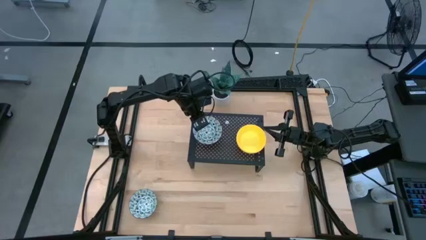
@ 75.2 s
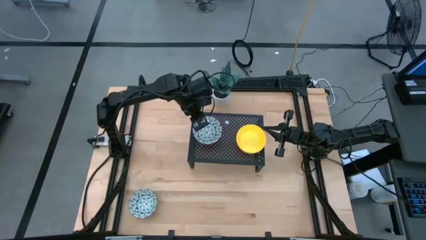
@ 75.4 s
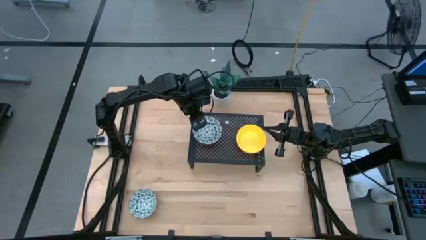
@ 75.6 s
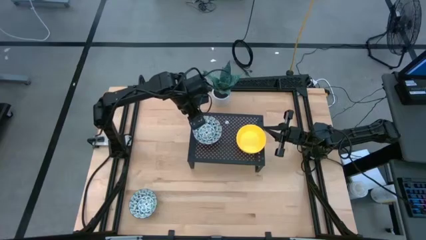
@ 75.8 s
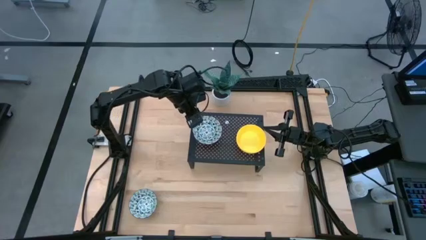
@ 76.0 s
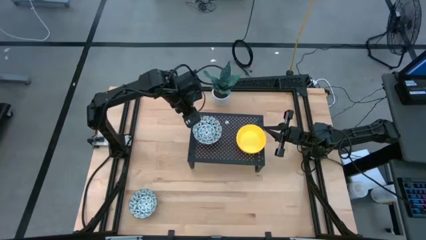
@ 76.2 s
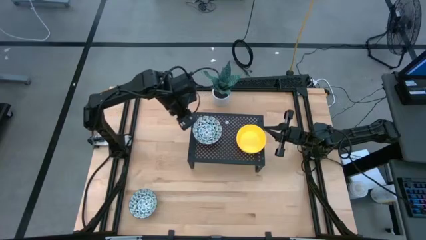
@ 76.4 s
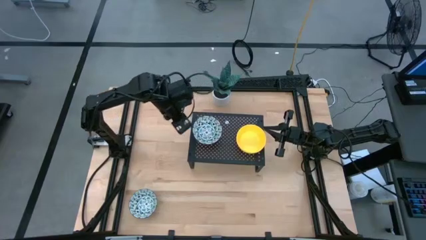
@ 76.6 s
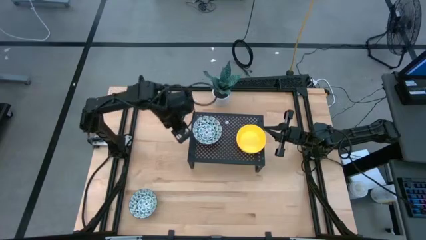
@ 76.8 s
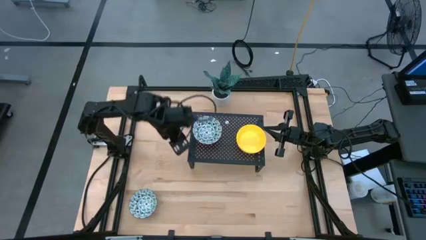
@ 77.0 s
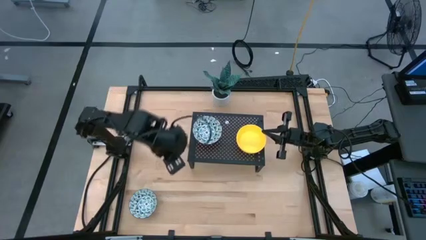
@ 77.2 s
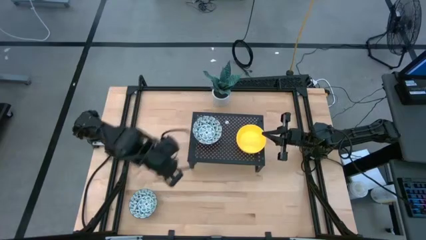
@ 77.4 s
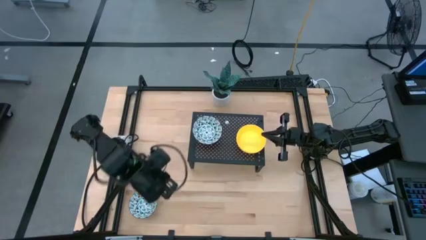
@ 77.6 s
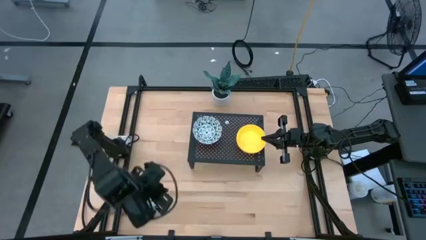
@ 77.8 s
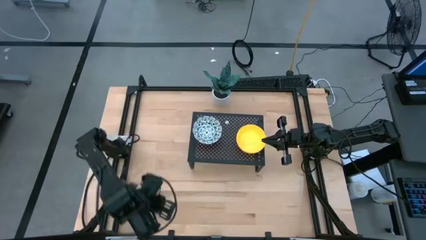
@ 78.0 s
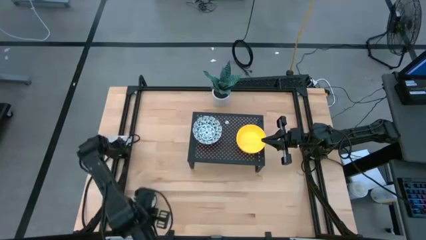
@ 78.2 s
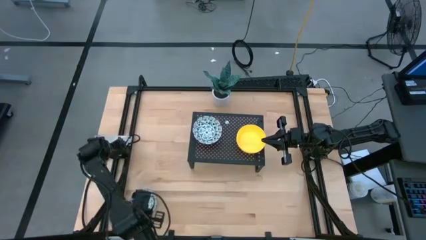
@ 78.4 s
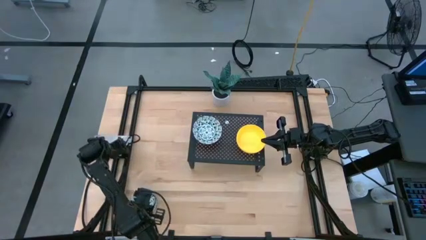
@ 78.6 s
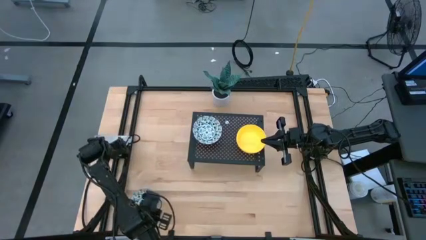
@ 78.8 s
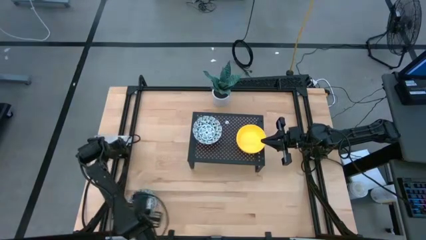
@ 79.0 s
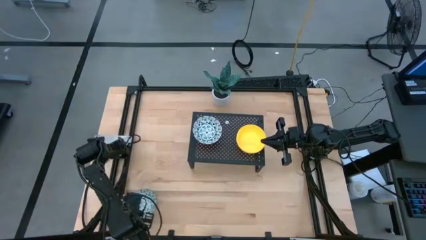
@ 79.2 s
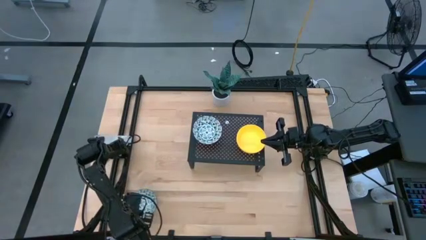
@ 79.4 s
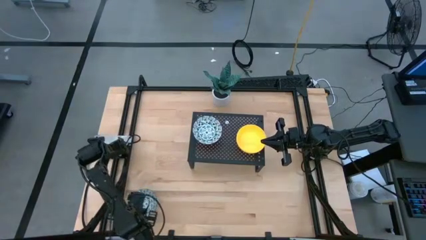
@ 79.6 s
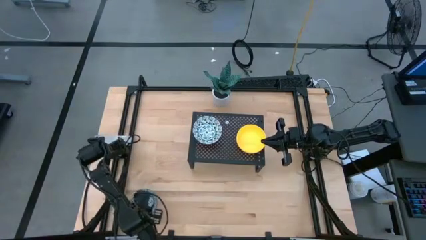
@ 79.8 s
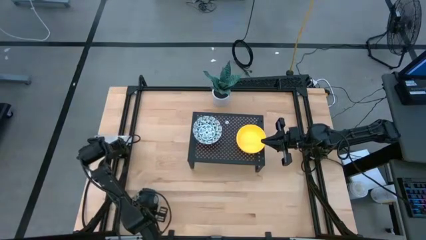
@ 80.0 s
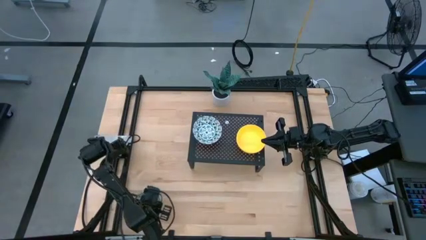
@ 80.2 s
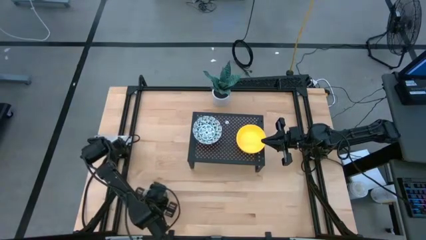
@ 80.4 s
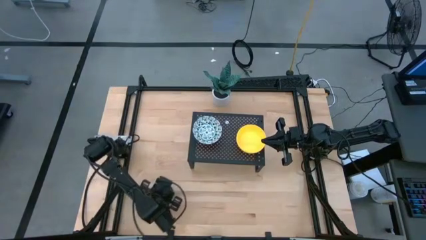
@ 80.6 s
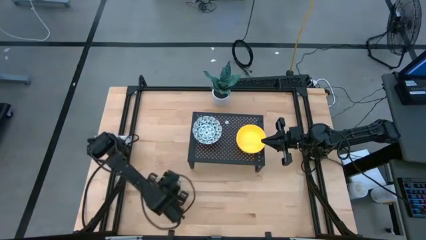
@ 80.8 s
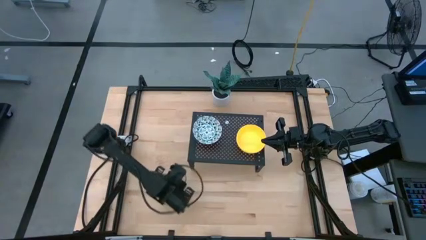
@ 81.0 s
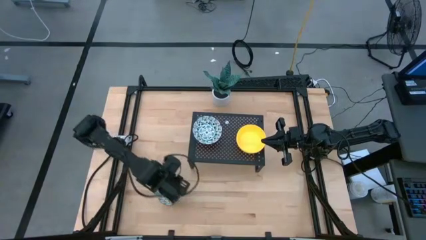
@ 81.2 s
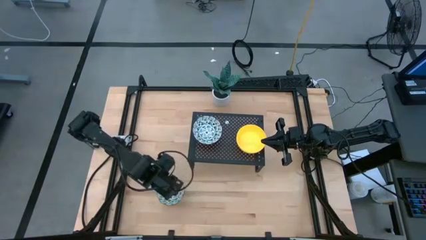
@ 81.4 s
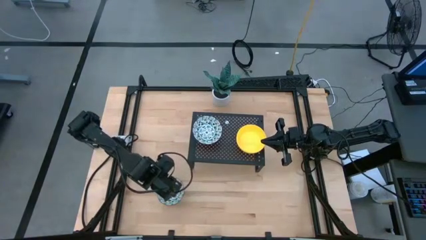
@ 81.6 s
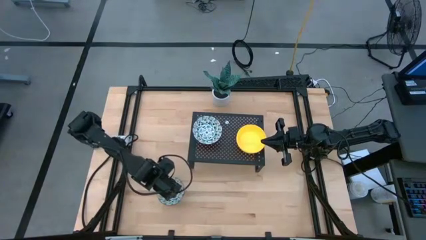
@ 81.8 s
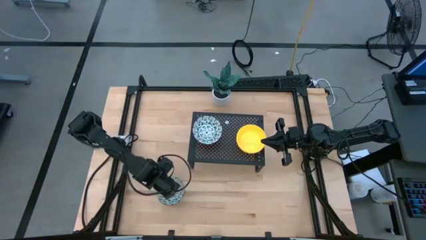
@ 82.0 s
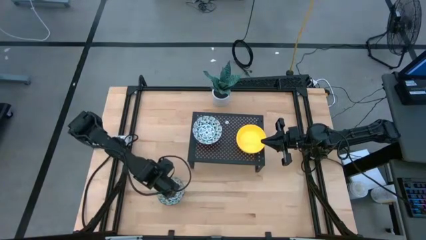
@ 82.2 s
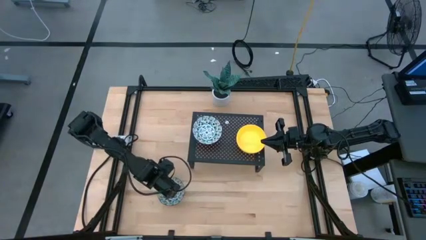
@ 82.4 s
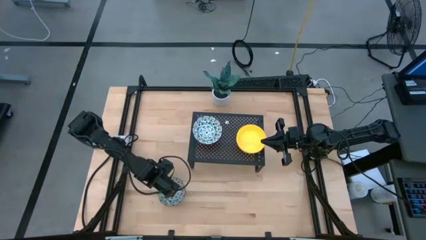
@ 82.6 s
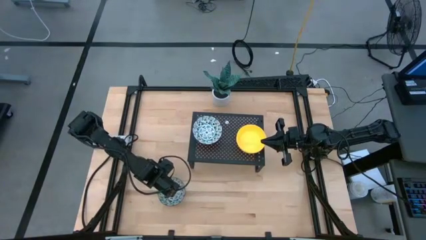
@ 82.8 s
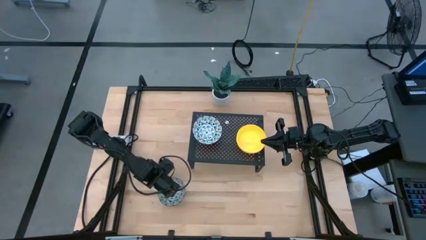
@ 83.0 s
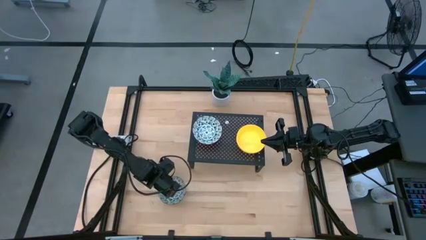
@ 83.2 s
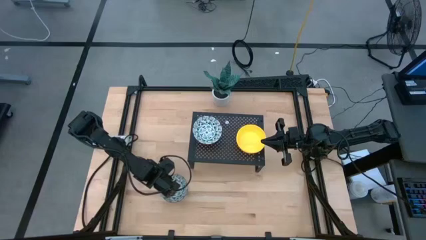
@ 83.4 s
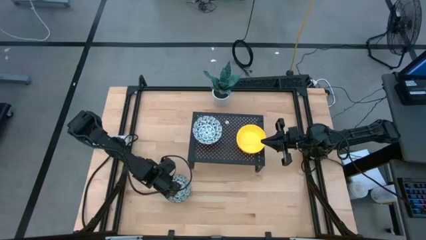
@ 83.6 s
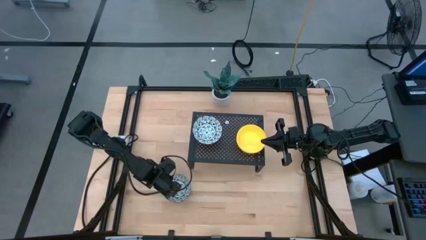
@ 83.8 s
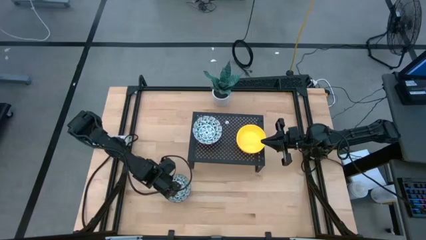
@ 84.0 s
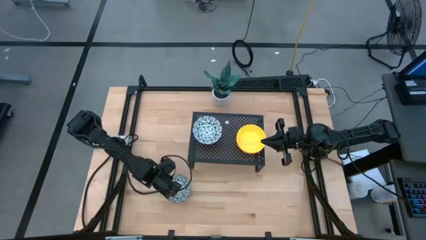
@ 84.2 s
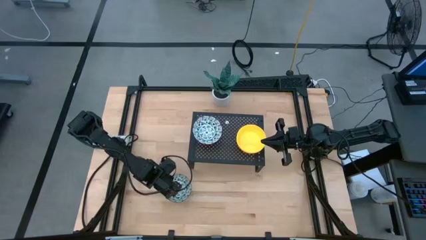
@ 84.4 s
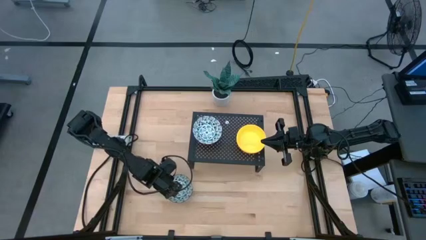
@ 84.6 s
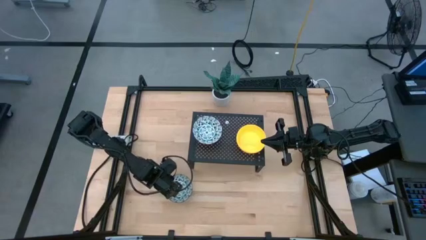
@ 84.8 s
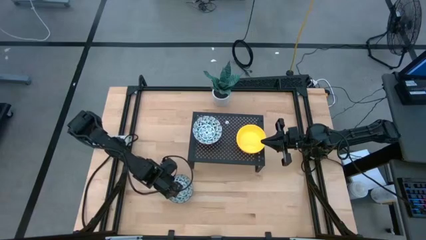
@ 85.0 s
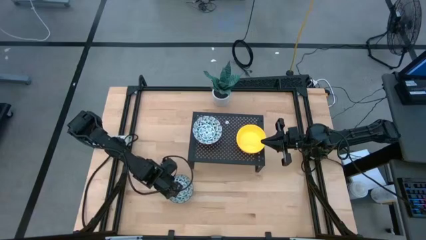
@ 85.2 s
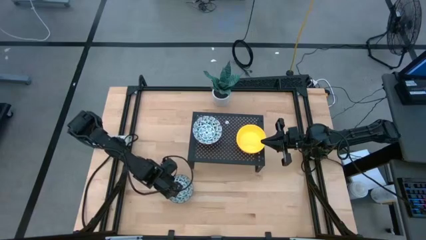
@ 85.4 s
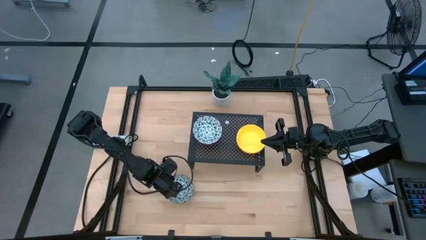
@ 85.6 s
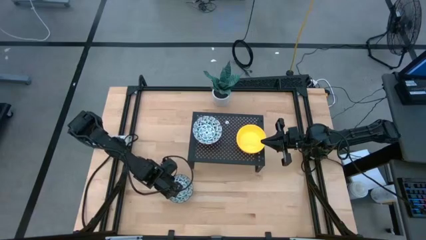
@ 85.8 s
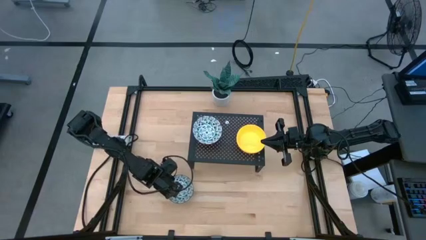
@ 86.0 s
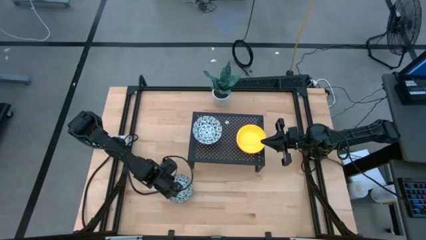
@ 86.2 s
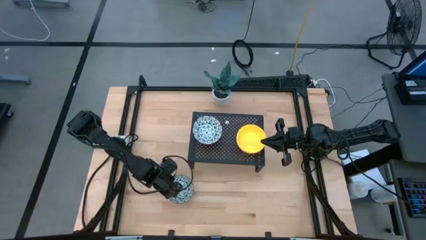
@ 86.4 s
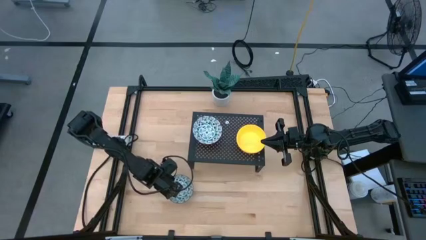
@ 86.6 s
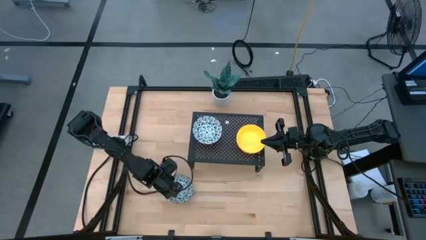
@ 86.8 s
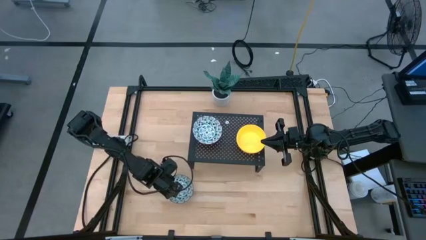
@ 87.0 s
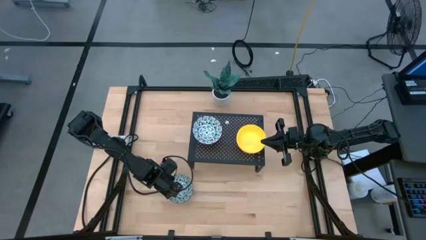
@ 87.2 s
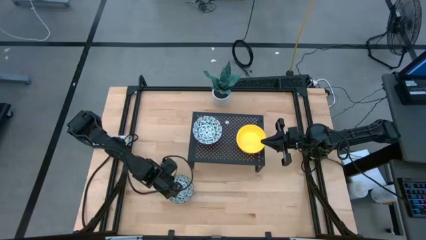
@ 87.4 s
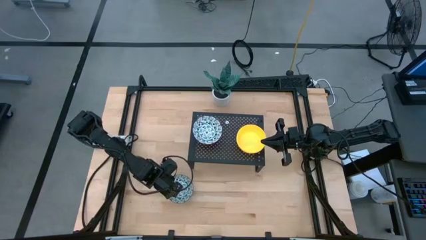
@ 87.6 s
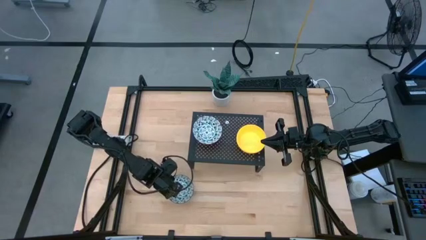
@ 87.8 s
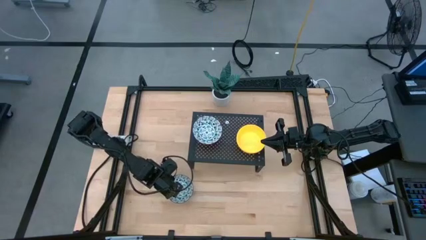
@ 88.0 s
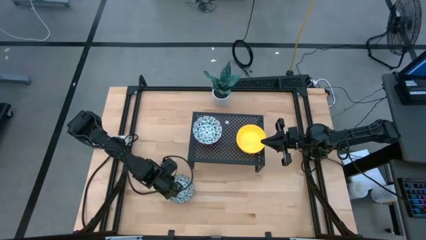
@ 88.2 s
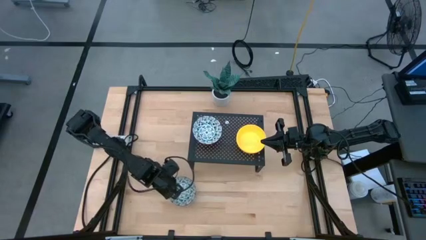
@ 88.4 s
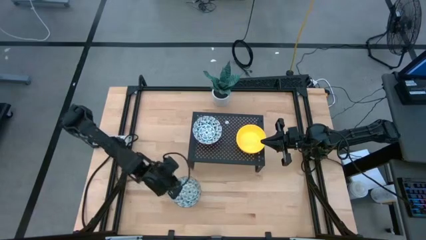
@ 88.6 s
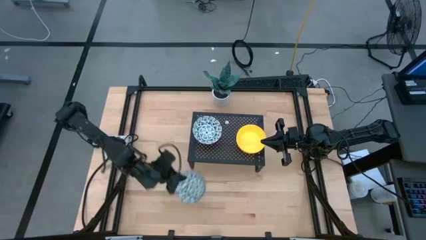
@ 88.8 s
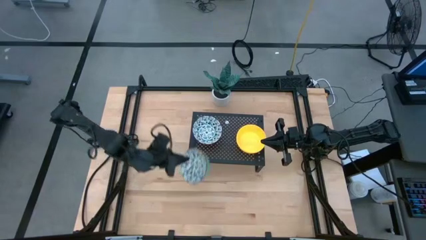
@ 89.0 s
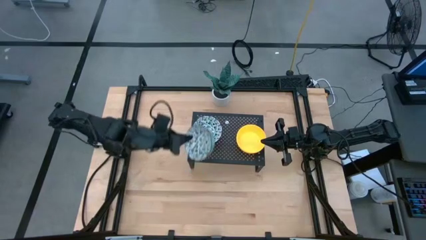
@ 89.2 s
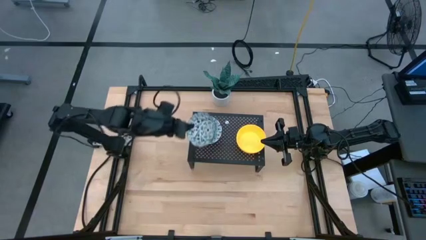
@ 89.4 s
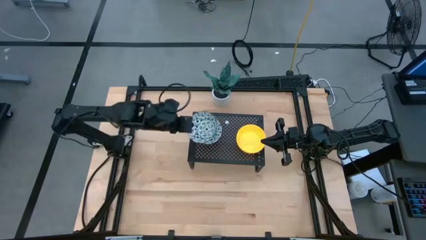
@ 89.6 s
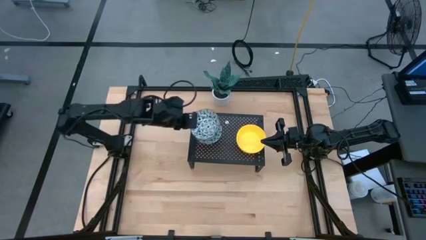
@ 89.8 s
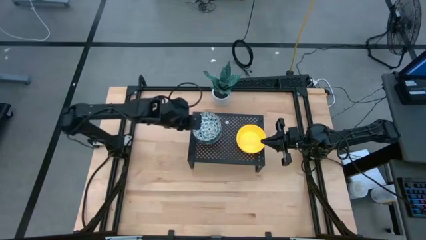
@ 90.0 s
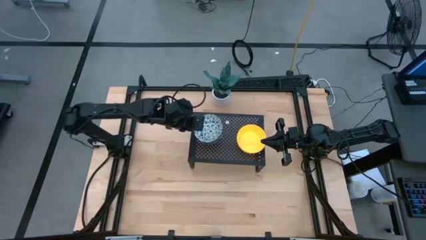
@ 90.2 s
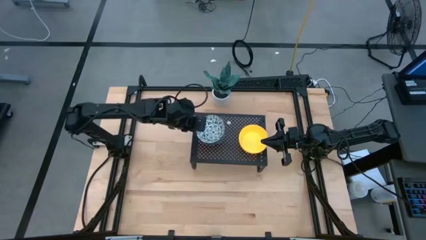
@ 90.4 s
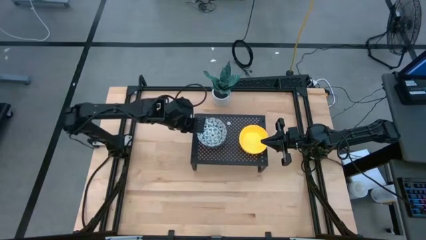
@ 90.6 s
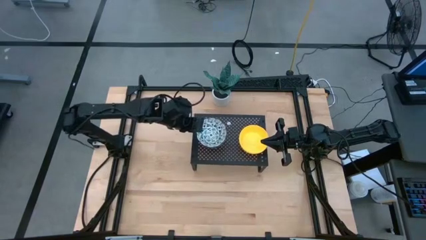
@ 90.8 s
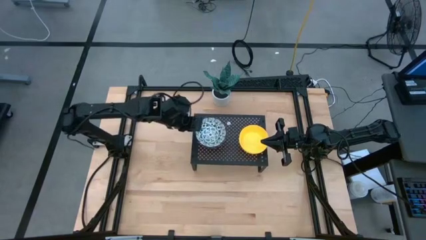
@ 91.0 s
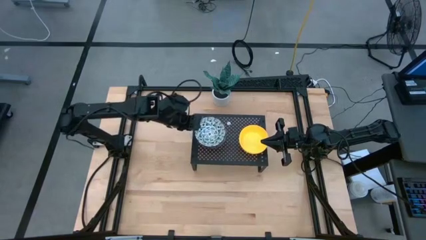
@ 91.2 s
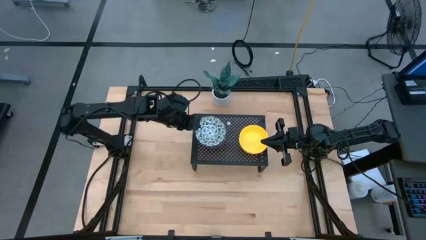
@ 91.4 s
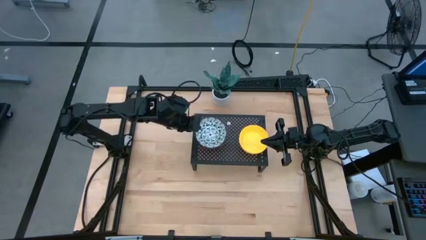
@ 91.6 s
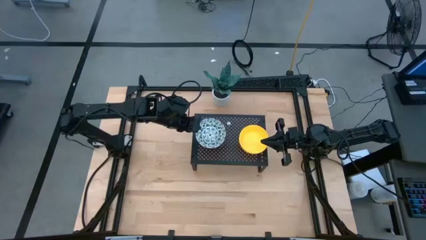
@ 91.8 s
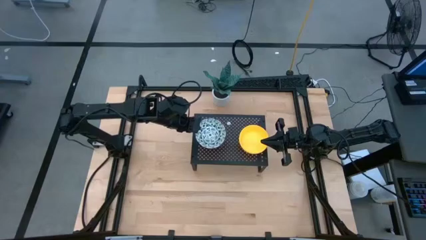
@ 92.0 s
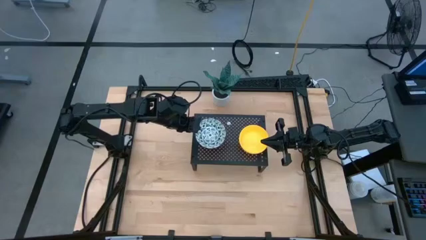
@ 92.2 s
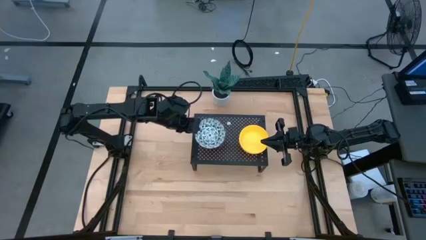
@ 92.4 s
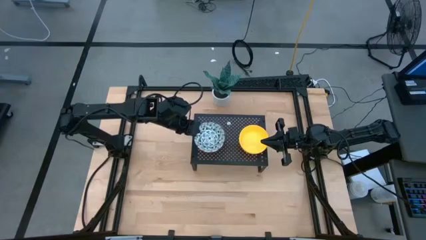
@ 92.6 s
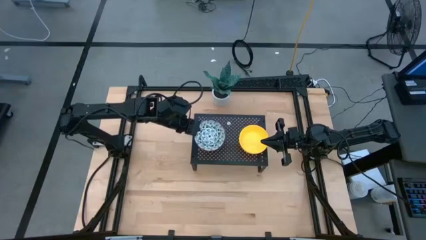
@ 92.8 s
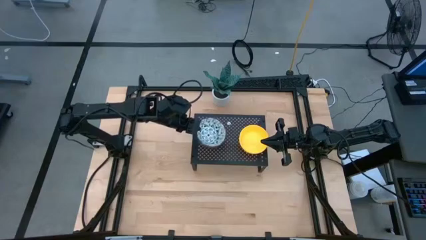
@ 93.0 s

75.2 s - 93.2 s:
Task: Pick & Place Mini bowls
Stack the blue patterned bowl on the blue patterned bowls on the shelf
